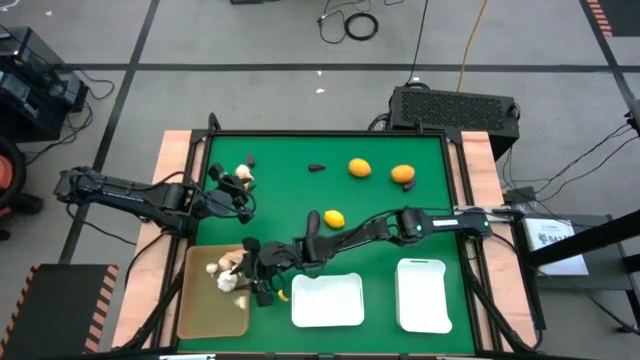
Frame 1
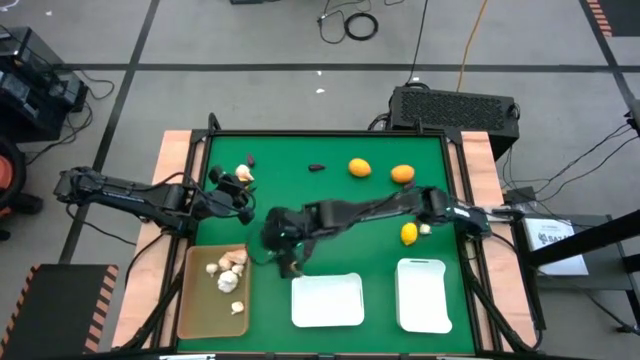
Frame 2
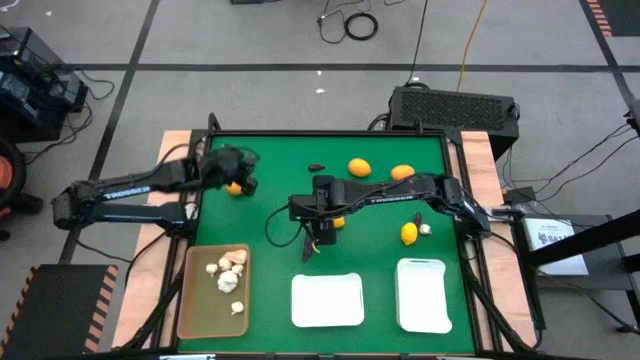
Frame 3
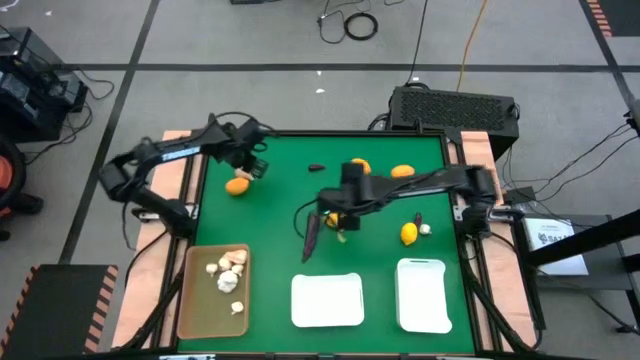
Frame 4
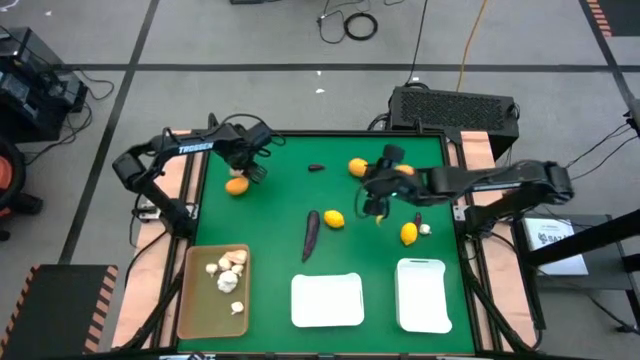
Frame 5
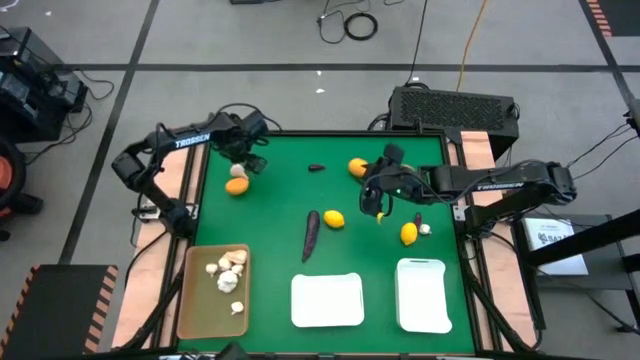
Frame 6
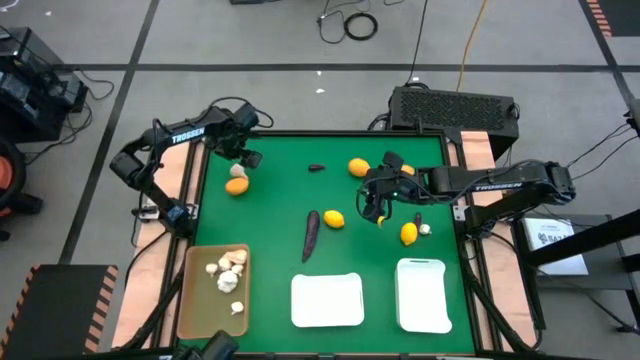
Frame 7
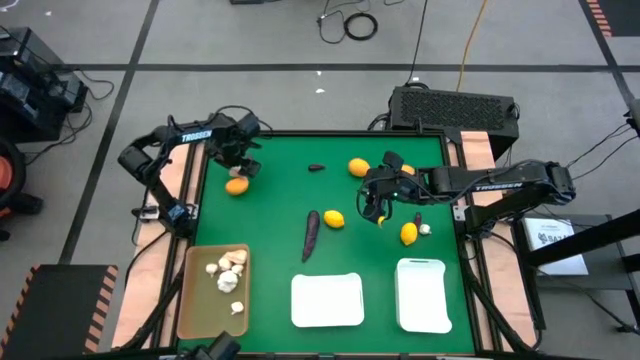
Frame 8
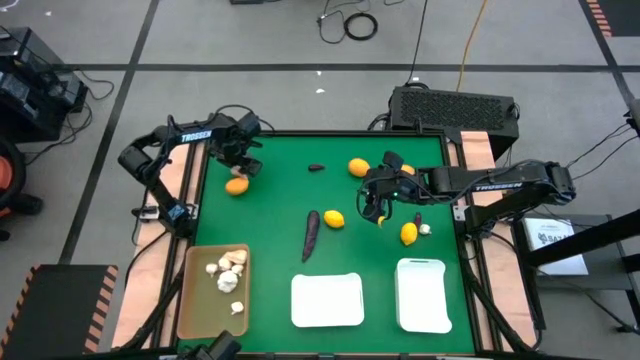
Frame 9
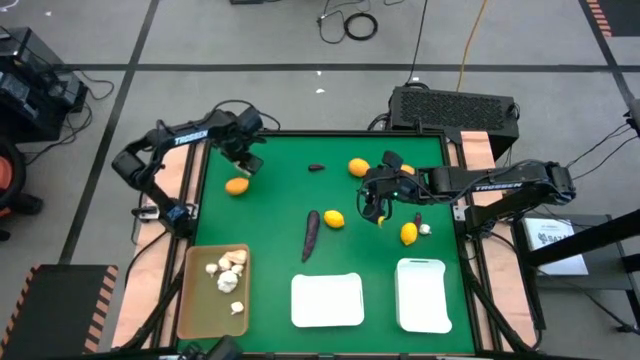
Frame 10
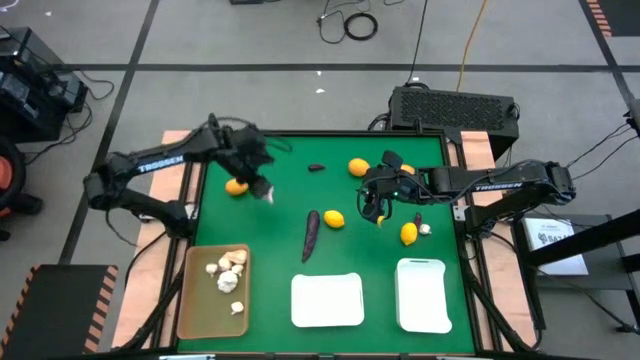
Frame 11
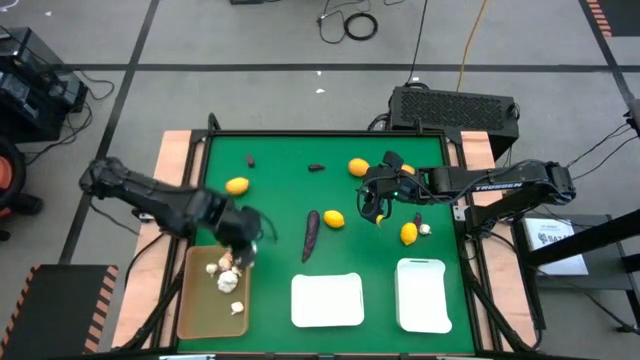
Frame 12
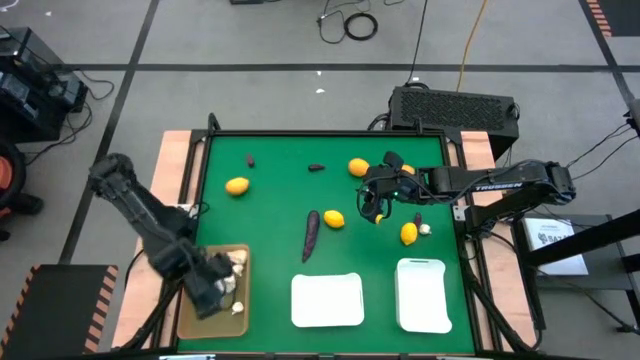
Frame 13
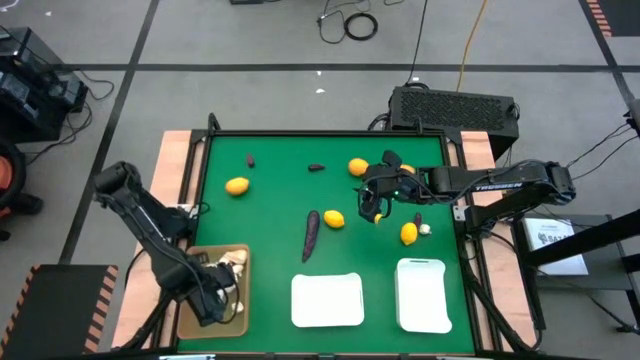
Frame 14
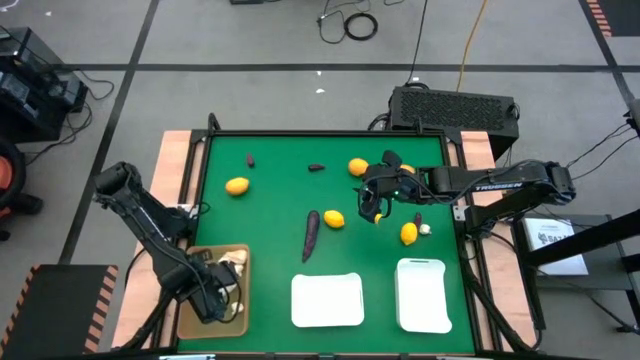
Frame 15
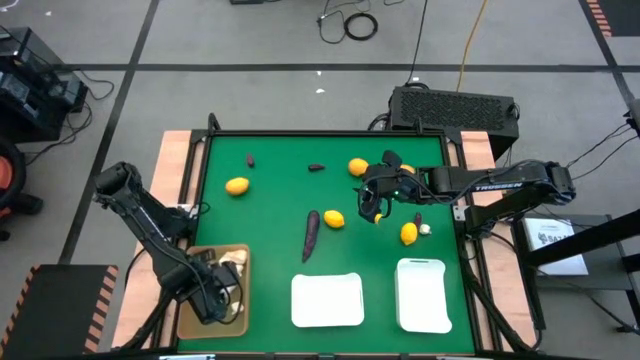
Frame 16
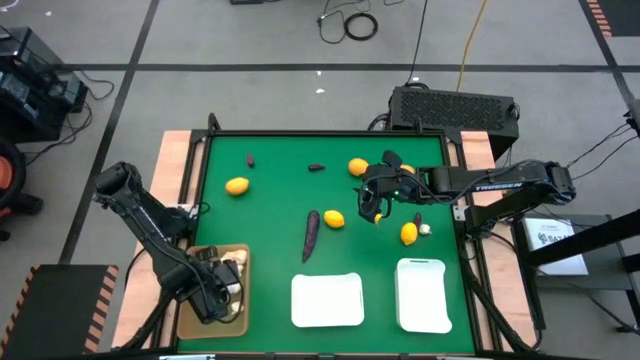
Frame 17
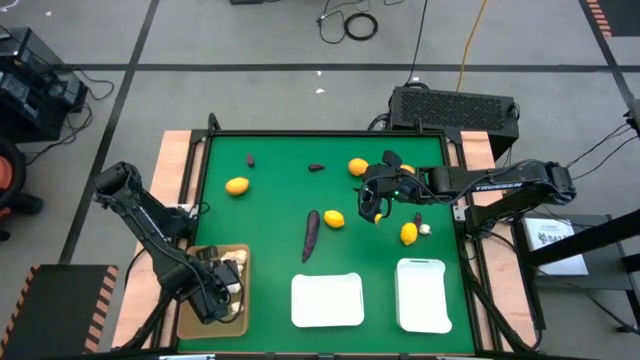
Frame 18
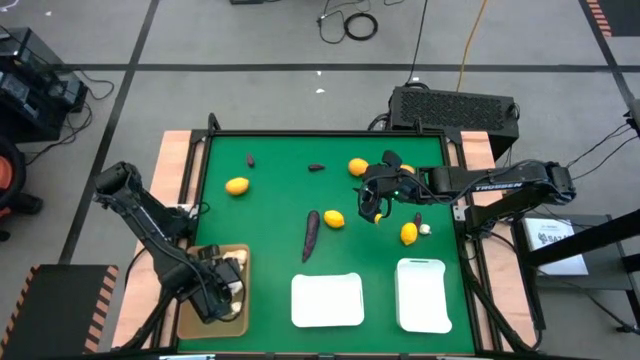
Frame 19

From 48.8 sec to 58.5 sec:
Task: Sort produce into baskets
Put the garlic into the orange bin

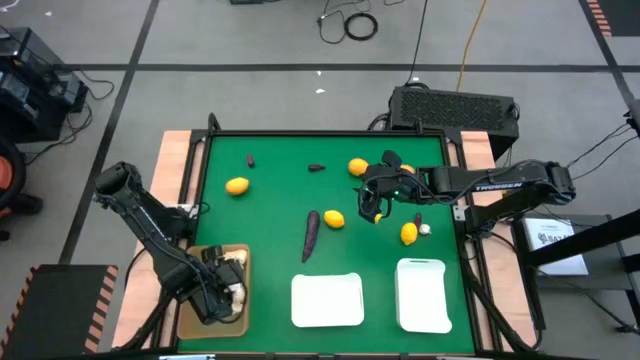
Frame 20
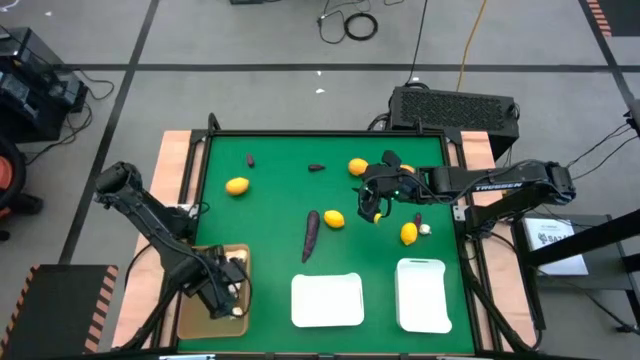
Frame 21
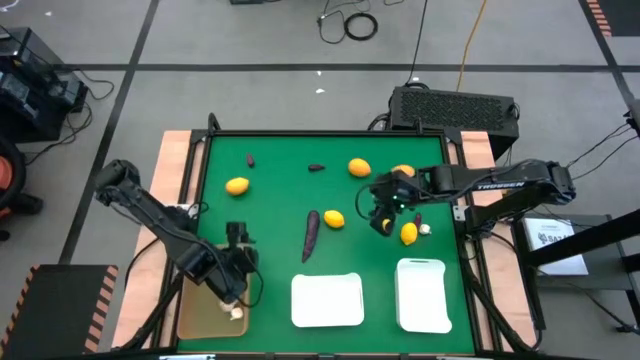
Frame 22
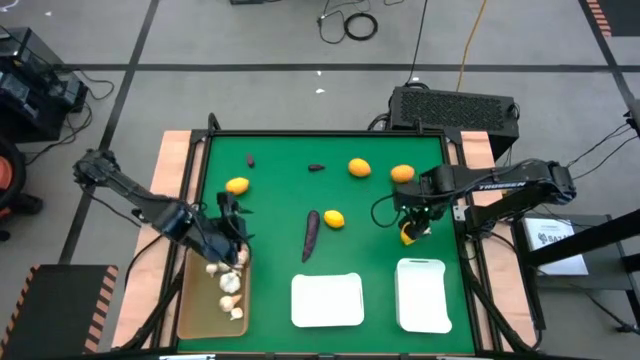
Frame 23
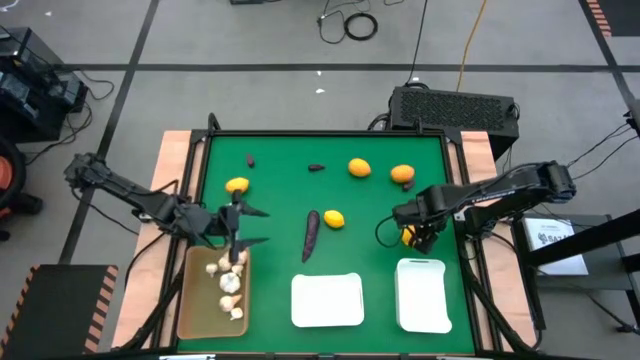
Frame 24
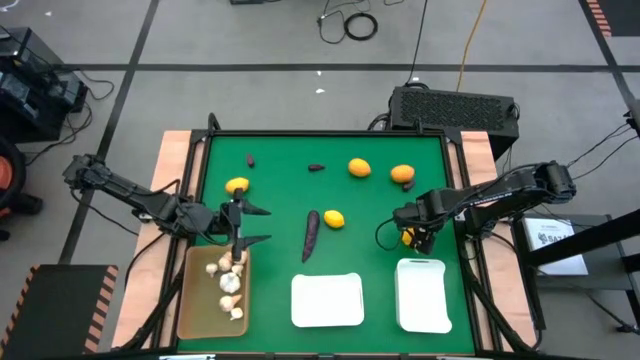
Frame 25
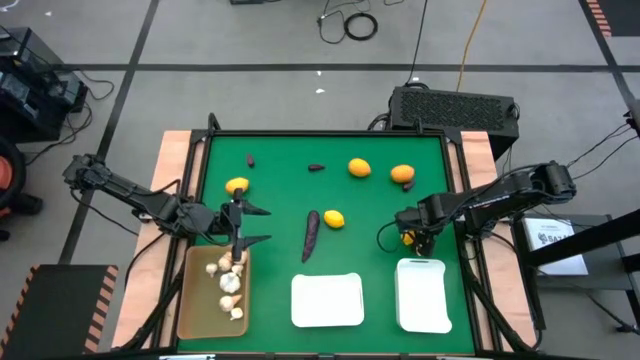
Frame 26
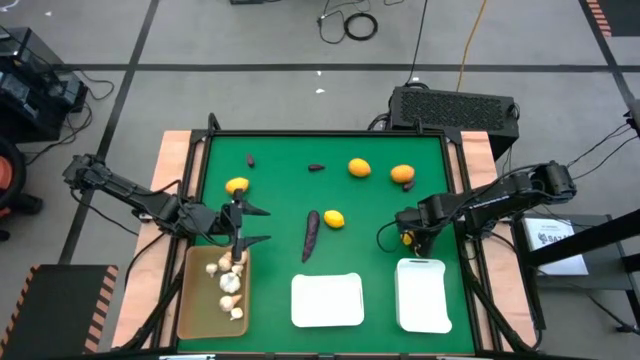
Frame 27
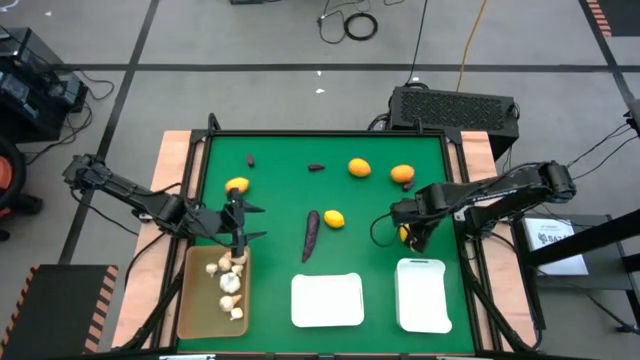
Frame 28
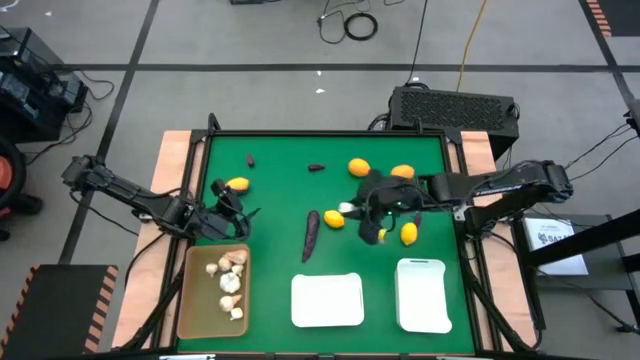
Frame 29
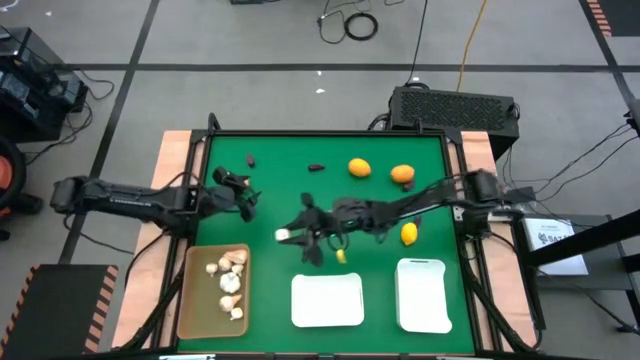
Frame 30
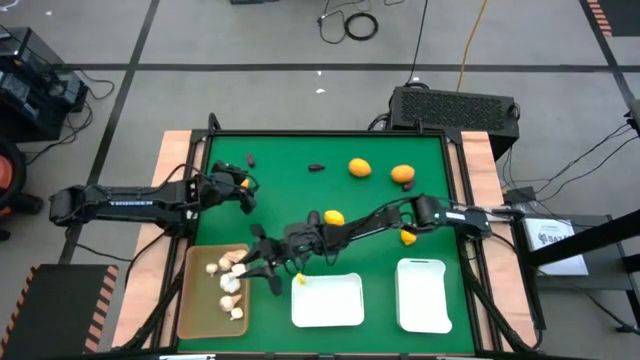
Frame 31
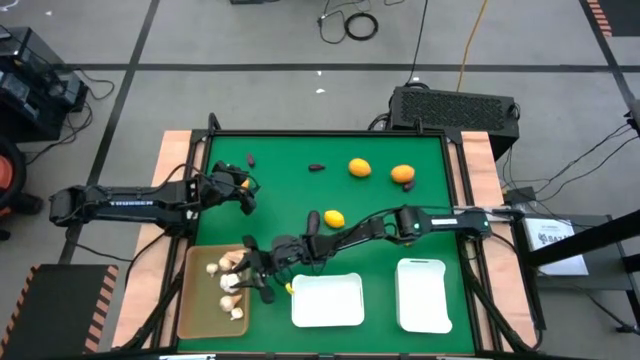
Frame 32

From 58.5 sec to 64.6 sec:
Put the garlic into the orange bin

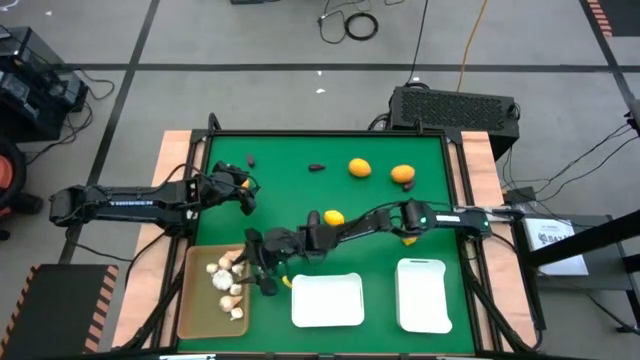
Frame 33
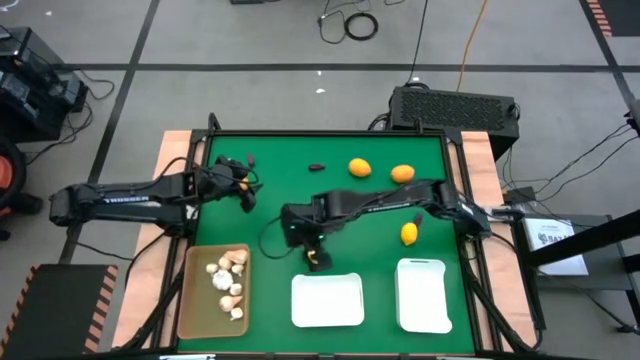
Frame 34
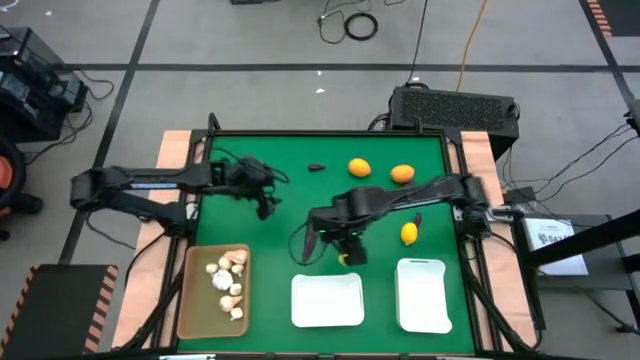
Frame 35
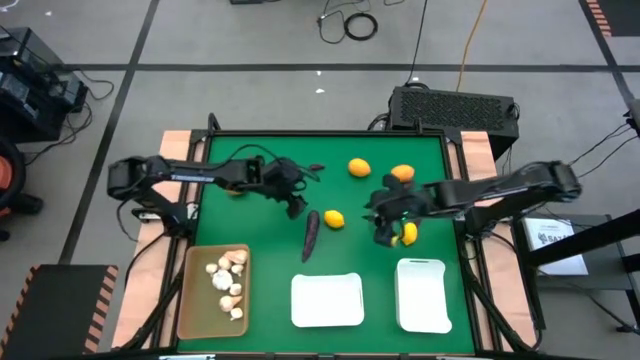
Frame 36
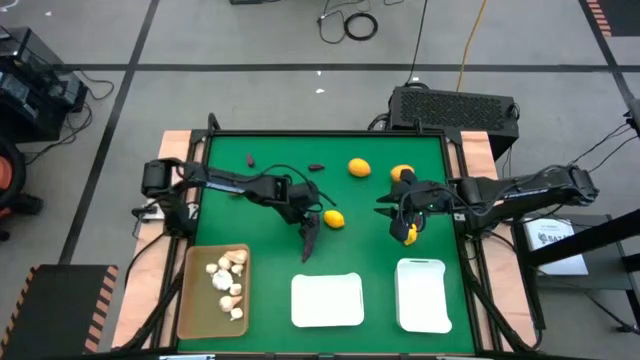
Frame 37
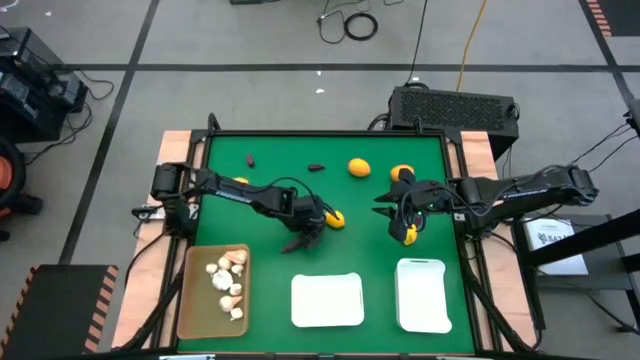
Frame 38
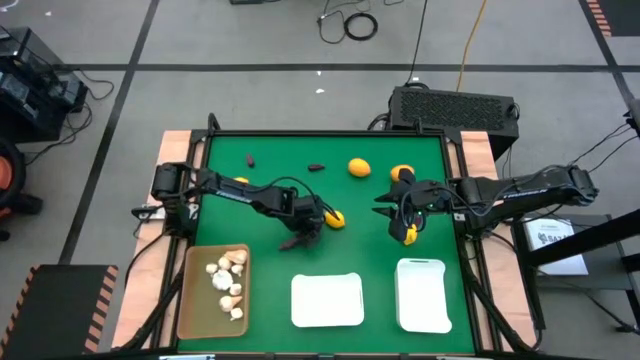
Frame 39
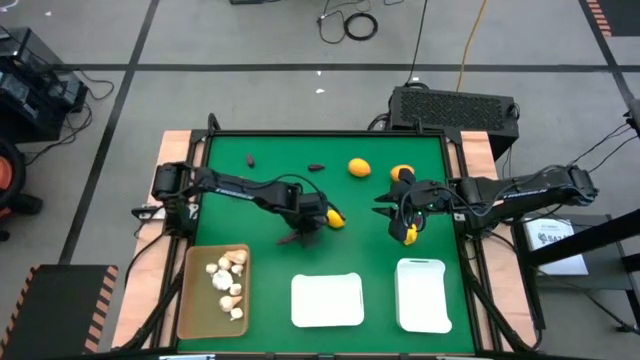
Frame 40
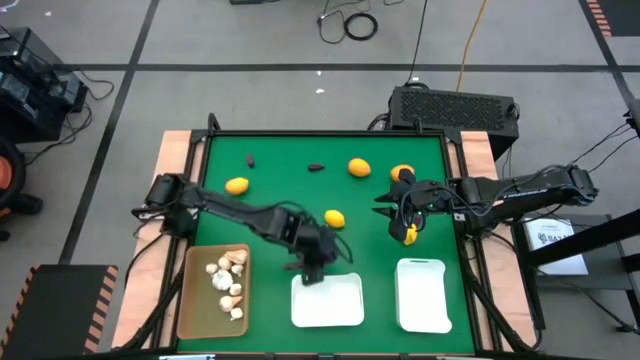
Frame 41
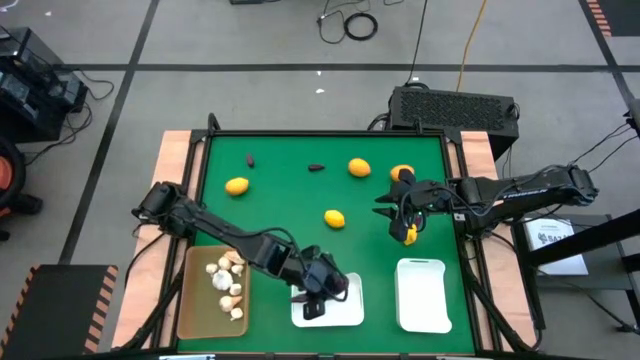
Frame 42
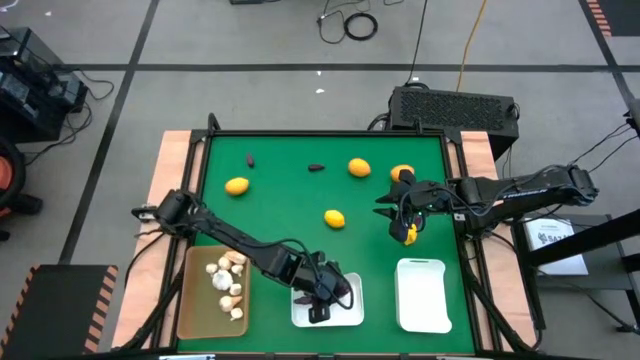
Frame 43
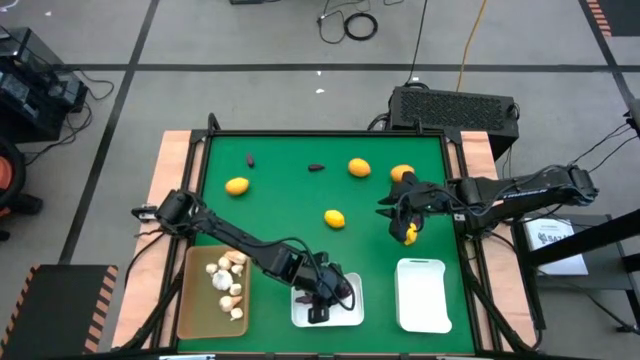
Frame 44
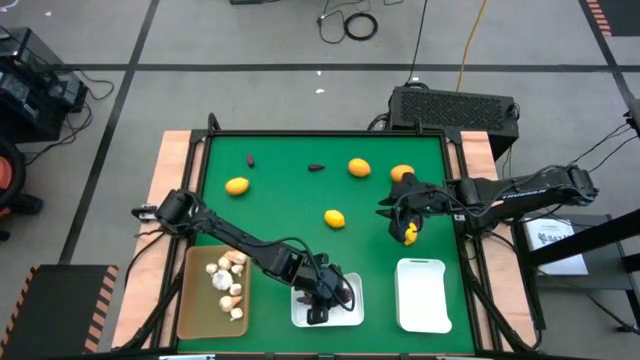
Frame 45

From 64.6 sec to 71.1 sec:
Put the eggplant into the left white bin
